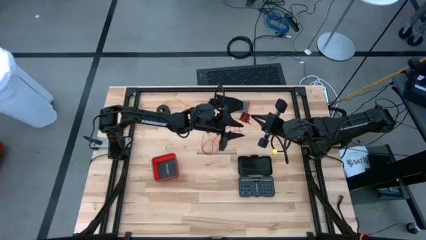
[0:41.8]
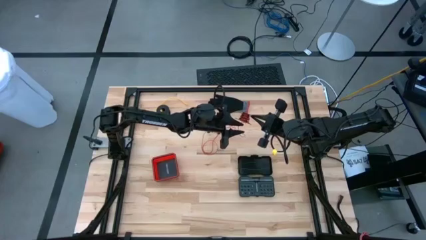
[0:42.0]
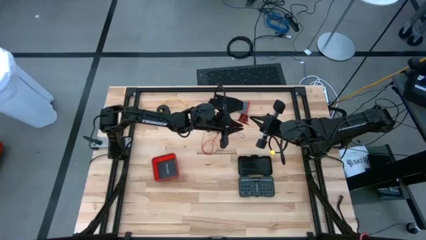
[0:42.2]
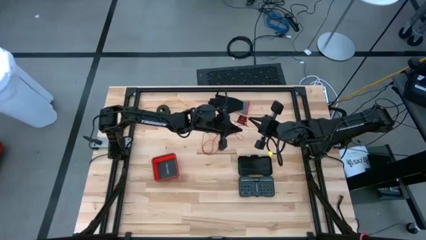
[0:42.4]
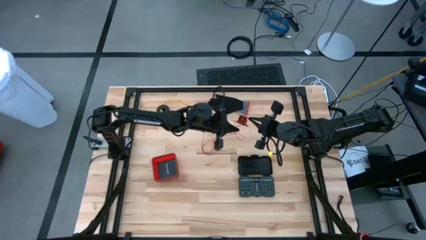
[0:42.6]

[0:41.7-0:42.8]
Task: Coil cords
Uncoil the red wire from the spool

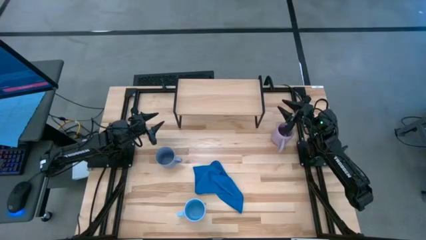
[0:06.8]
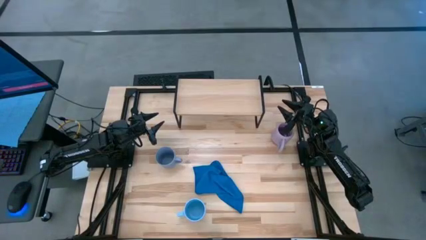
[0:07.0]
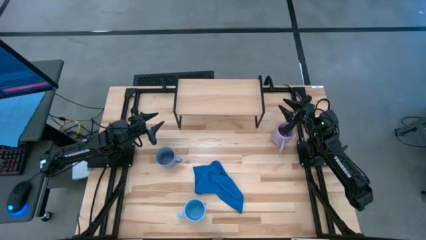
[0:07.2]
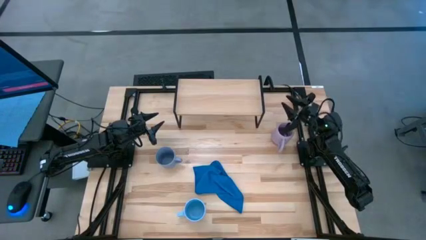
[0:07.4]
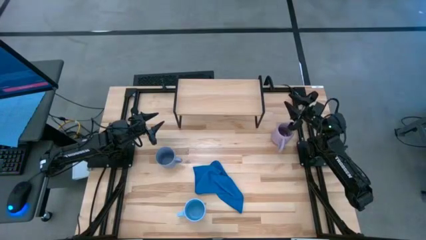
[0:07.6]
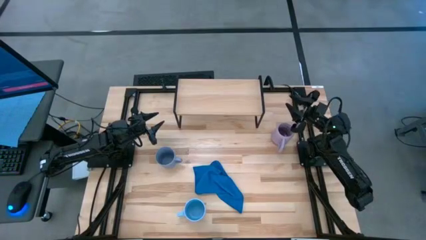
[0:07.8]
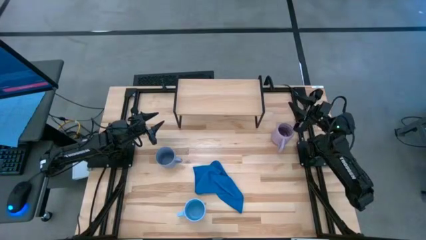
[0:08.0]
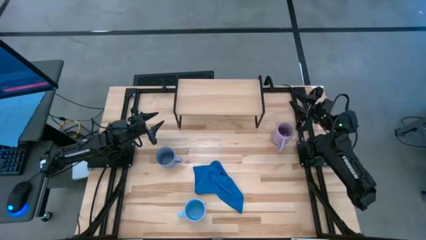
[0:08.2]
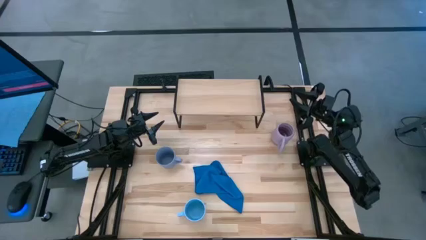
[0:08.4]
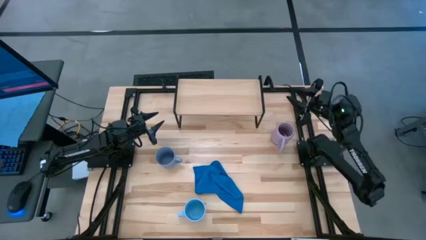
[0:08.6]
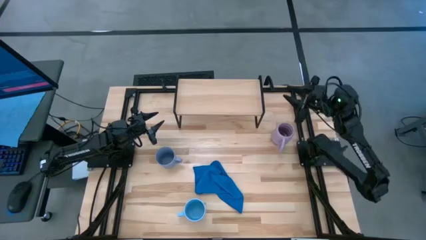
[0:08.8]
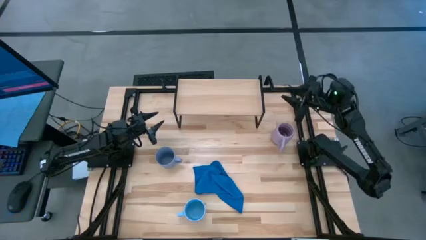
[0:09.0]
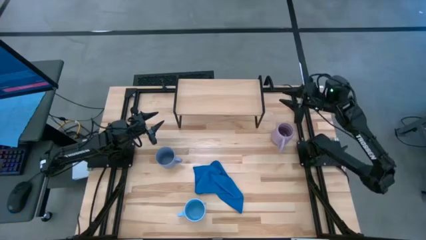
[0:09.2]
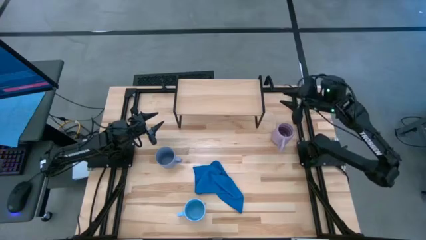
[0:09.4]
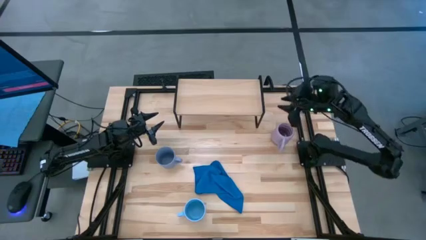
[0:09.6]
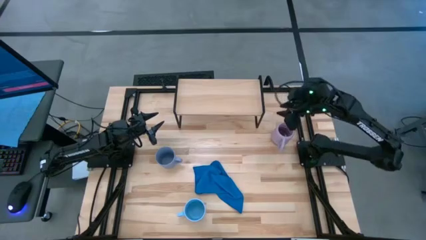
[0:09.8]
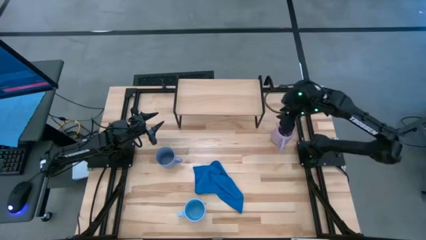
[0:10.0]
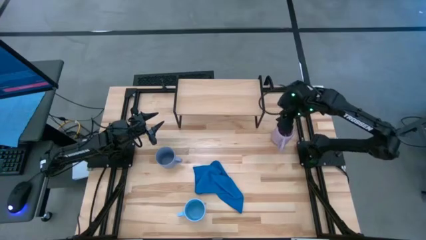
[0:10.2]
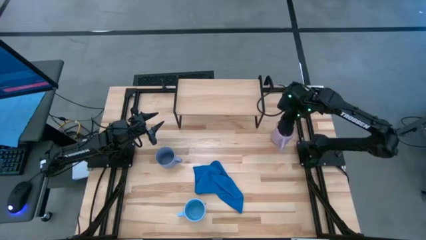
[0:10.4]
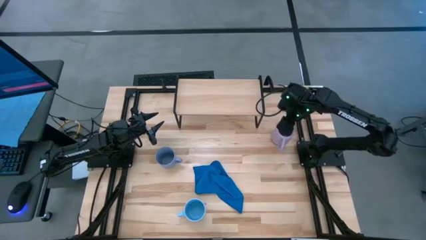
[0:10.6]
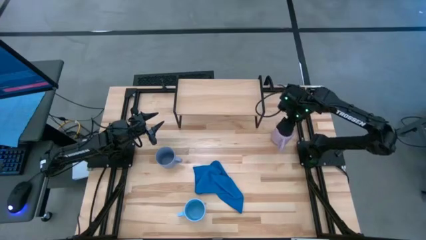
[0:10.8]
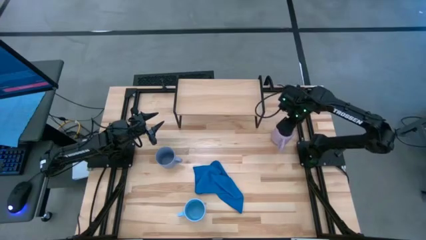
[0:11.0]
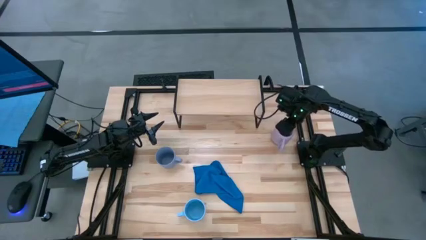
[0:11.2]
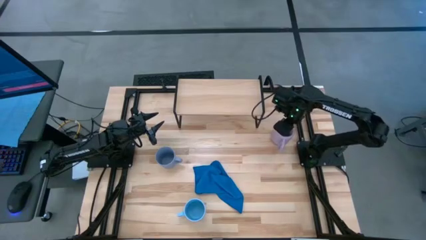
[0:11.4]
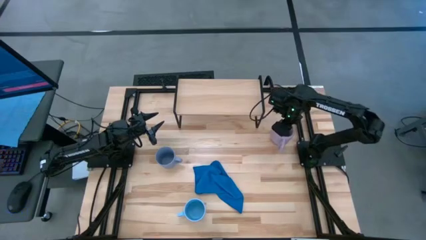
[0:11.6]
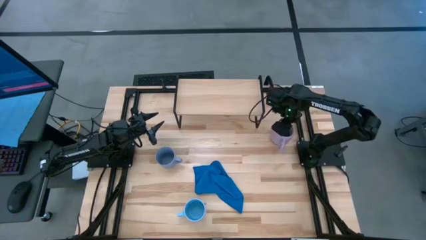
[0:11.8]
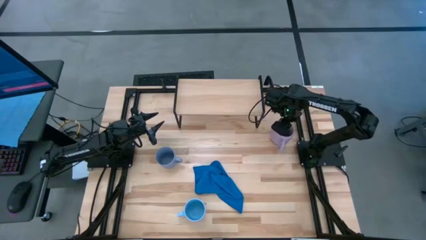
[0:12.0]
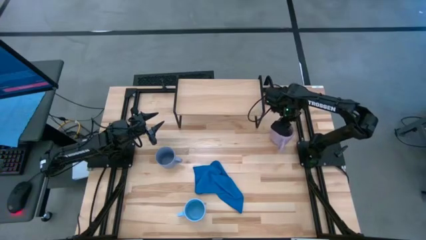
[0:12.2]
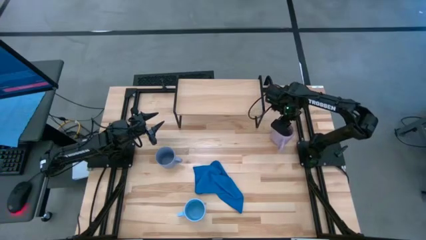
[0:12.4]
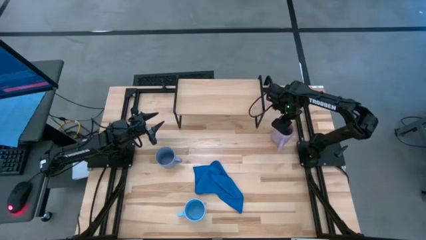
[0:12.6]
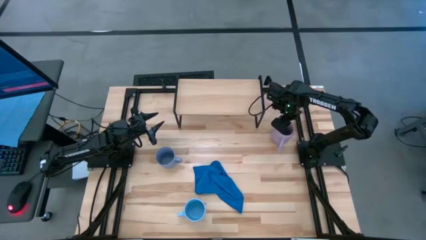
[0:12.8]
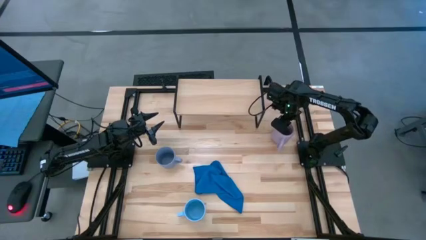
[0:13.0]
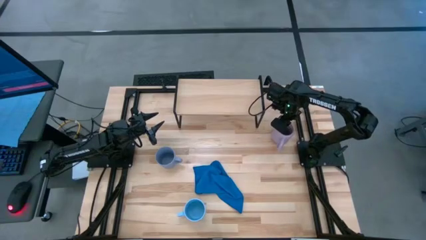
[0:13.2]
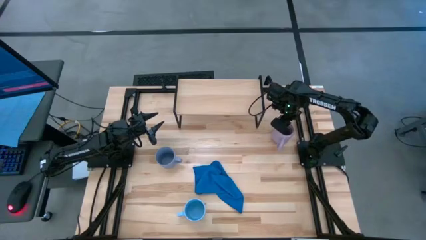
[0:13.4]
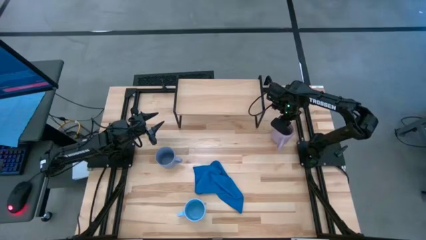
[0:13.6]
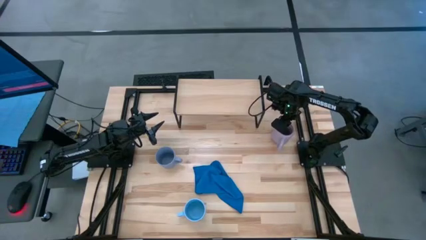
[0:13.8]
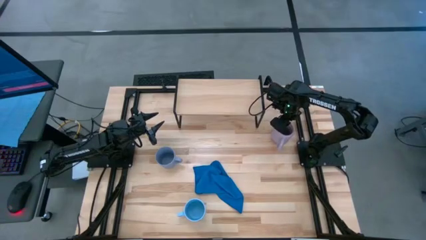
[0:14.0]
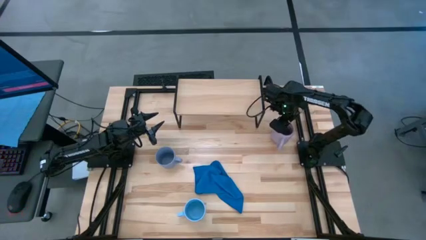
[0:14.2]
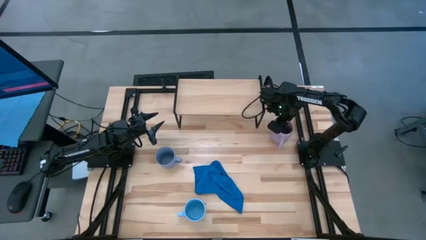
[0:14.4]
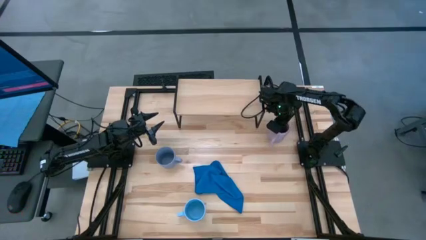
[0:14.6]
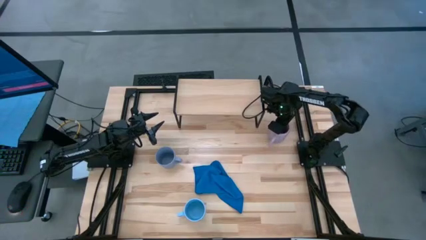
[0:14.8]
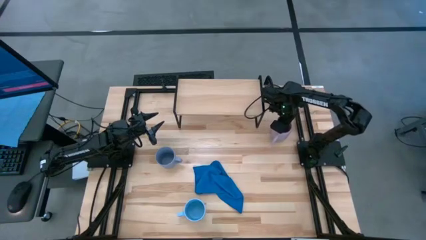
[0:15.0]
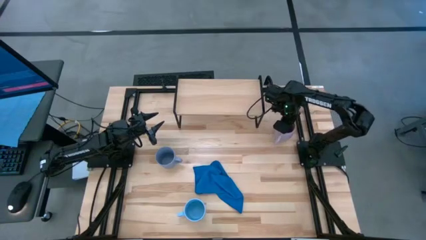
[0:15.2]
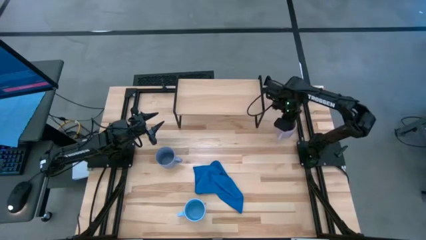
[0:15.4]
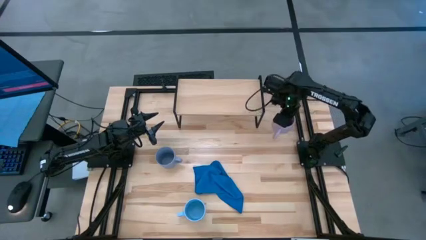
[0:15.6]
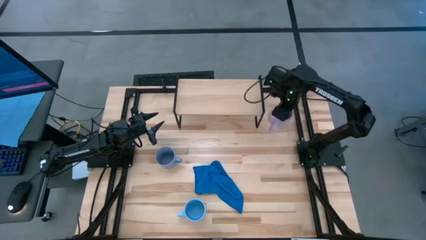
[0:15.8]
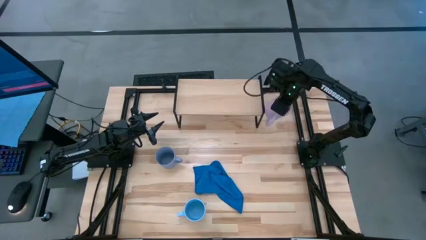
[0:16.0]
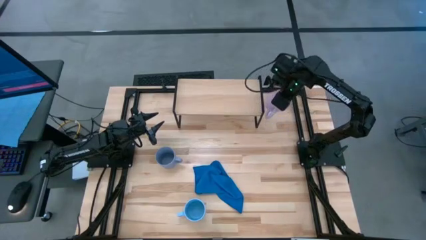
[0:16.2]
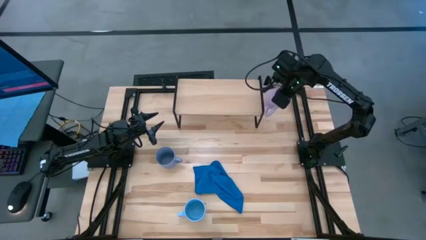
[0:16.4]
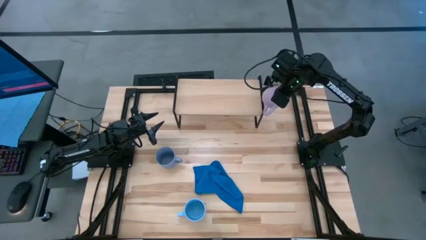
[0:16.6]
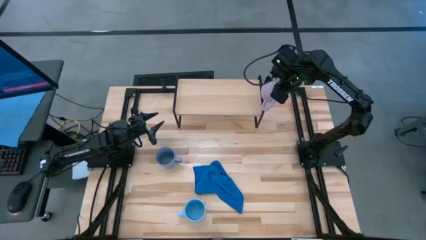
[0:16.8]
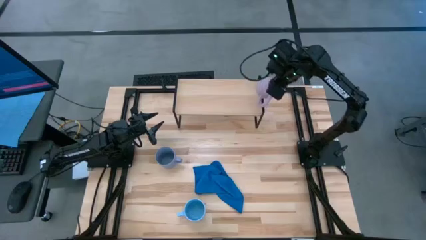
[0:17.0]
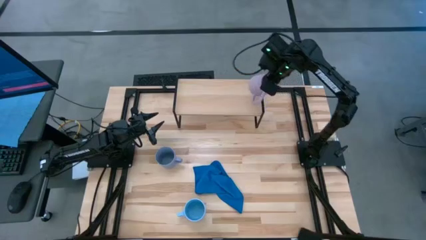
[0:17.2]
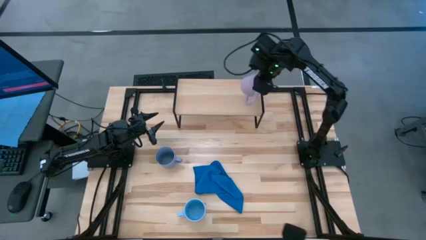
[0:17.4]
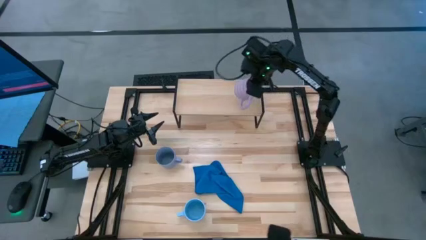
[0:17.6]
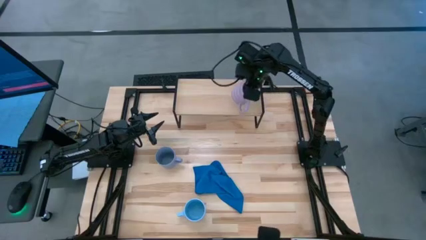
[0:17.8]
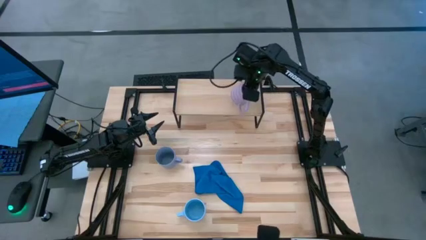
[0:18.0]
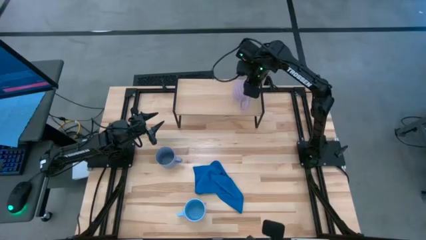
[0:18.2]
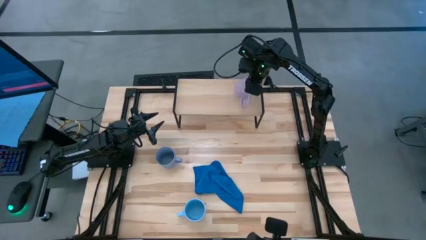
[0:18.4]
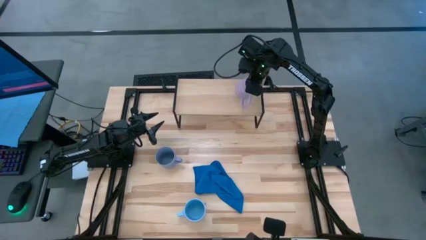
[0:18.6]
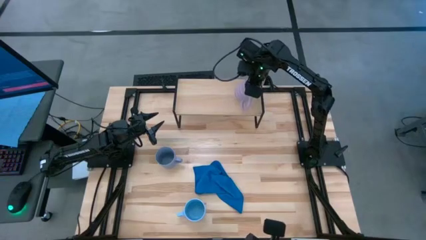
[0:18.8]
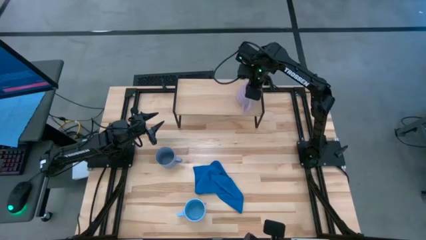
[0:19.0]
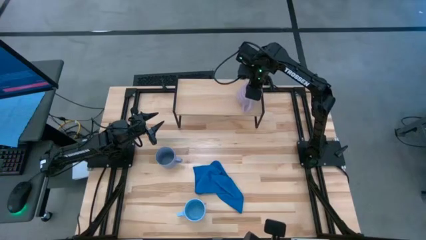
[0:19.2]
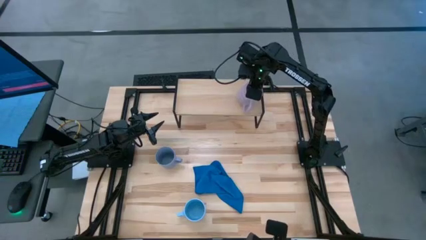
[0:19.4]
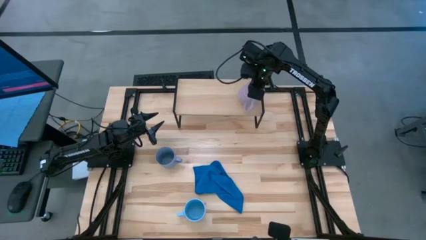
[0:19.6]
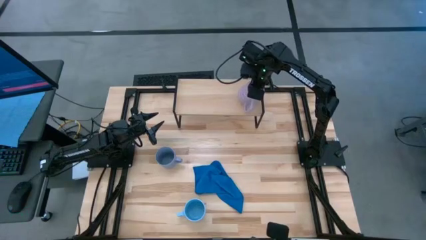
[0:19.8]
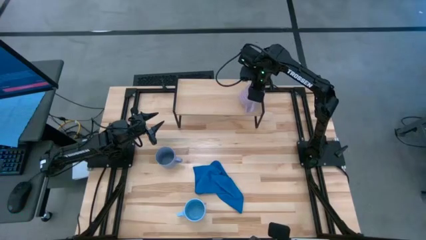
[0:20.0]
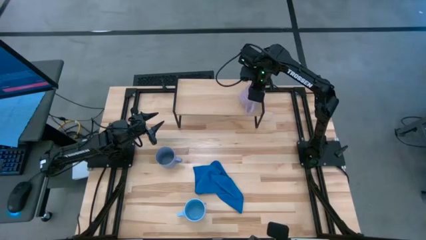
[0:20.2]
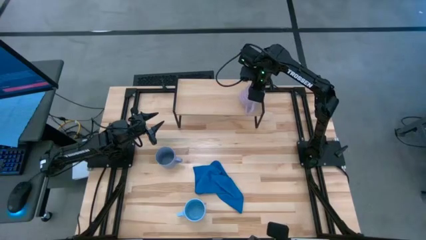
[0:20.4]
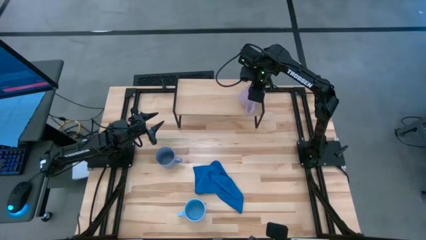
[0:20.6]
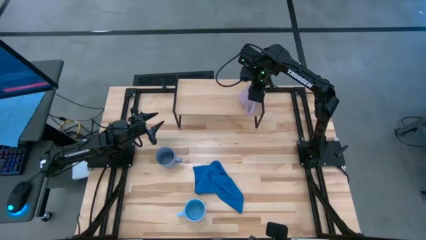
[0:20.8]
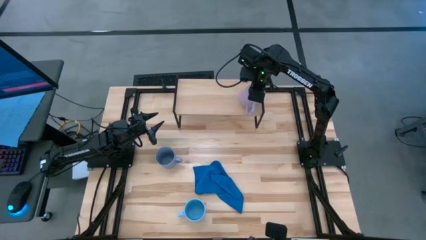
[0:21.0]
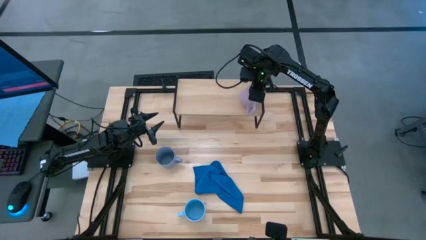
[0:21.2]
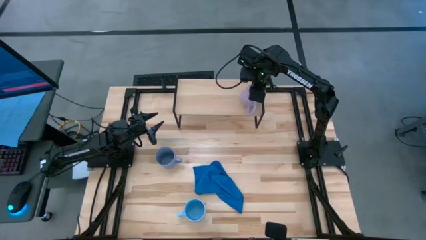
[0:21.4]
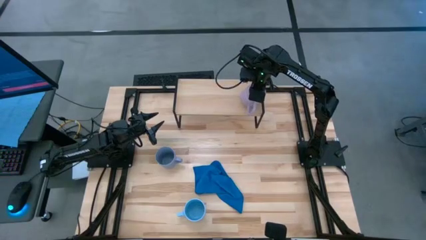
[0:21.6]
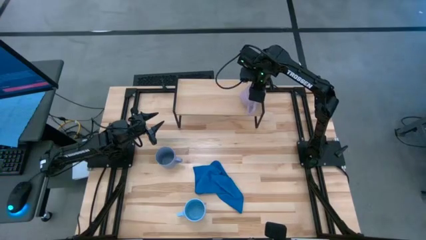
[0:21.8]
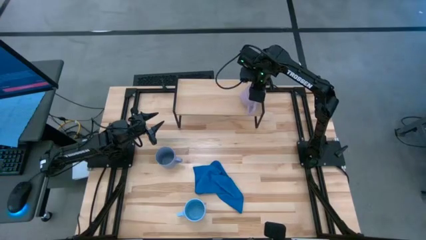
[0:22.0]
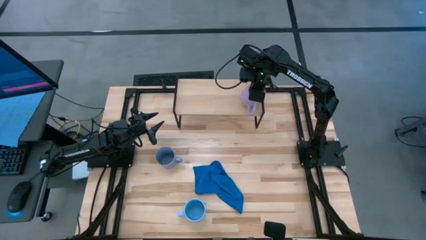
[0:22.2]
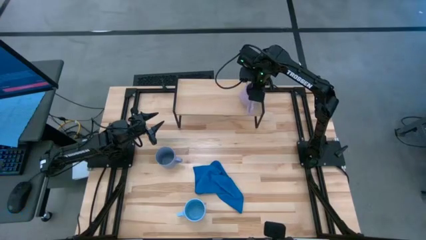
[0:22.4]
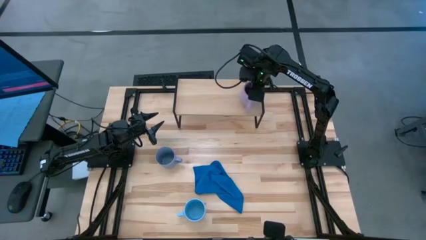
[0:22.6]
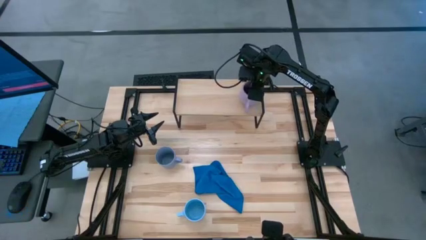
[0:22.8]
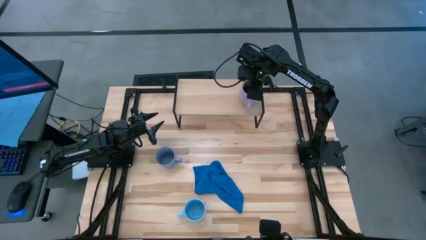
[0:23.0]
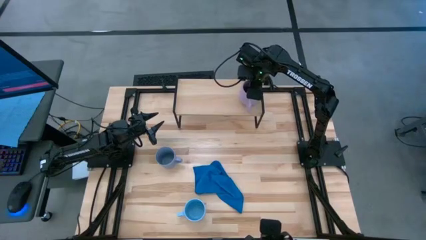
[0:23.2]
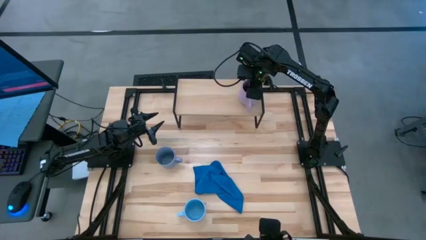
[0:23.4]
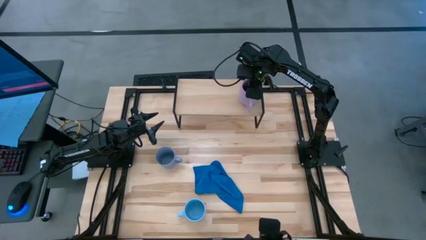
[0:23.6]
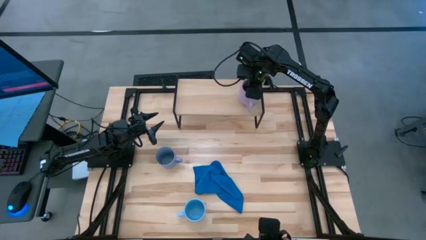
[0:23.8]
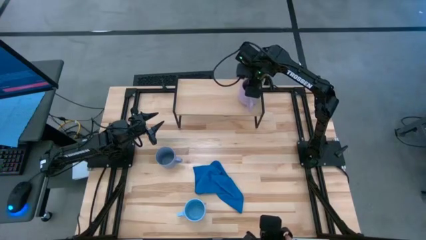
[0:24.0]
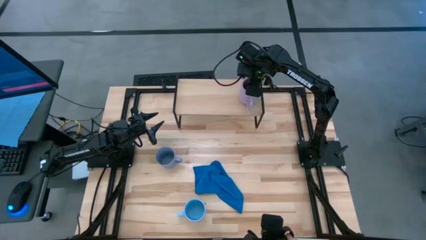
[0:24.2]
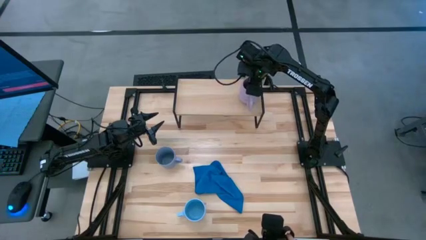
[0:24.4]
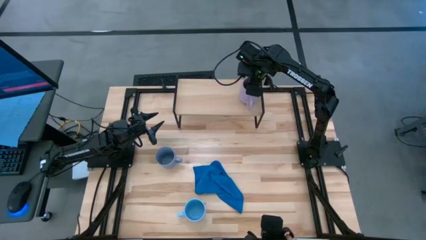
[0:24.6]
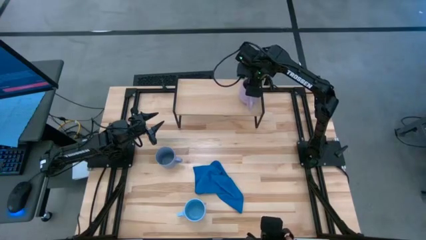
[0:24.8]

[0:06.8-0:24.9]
Task: Stack small to large cups/mugs on shelf
Put the purple mug on the shelf
